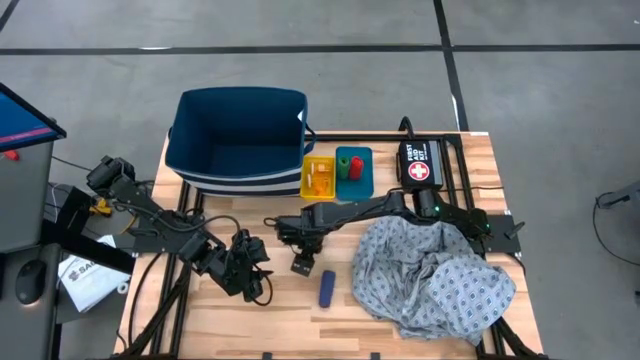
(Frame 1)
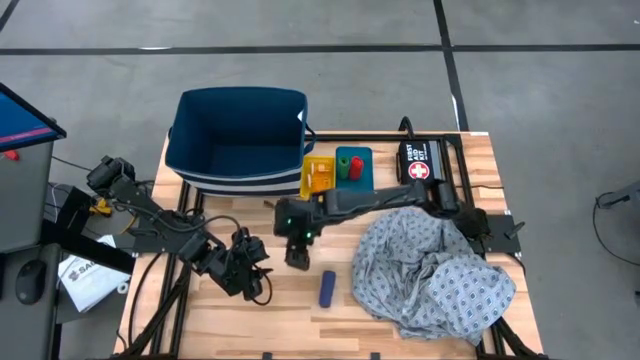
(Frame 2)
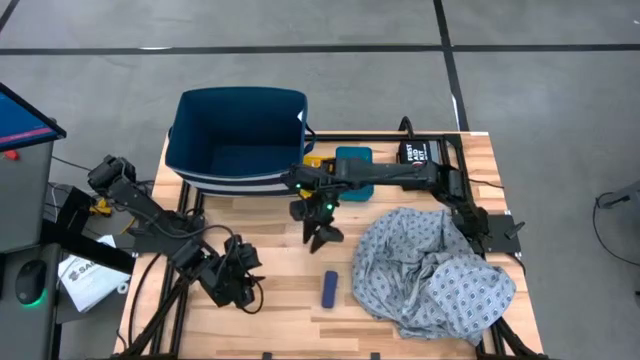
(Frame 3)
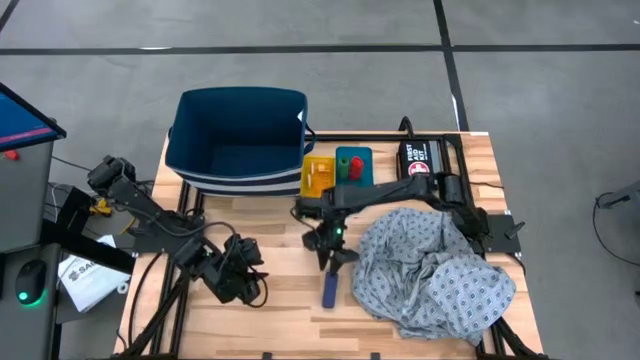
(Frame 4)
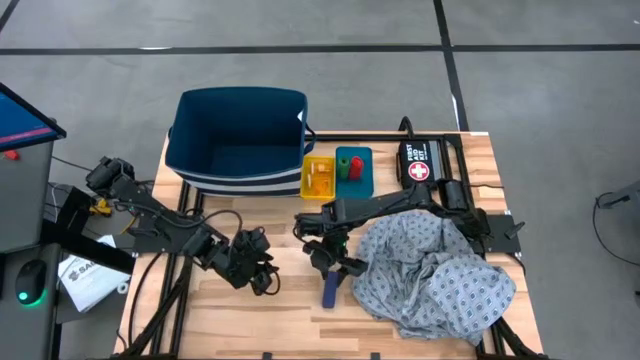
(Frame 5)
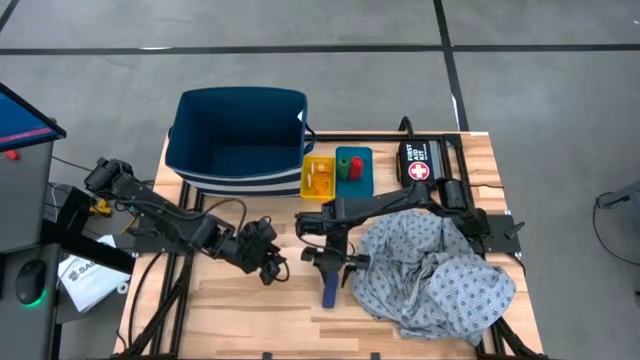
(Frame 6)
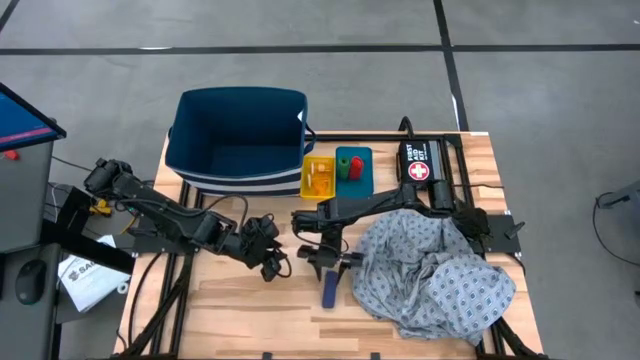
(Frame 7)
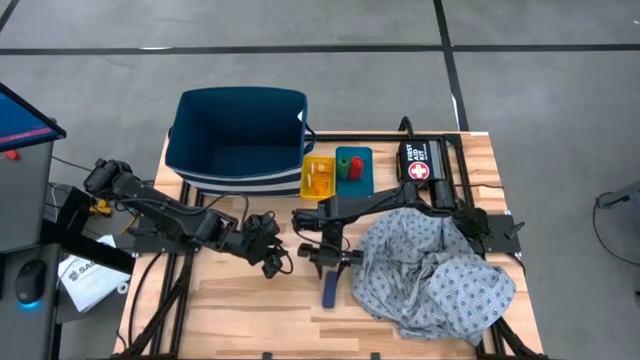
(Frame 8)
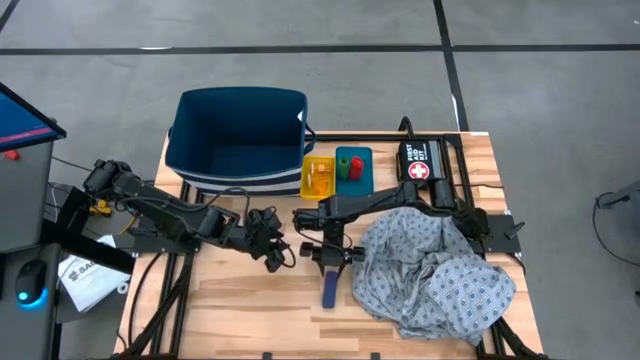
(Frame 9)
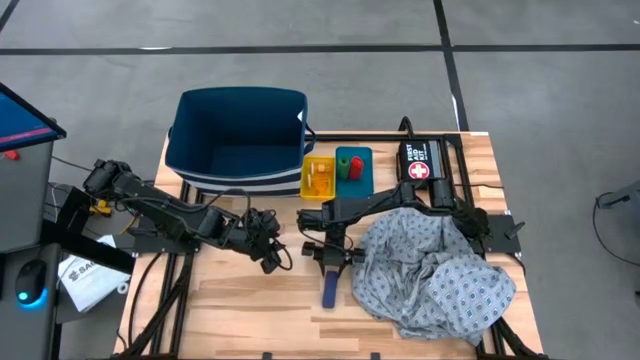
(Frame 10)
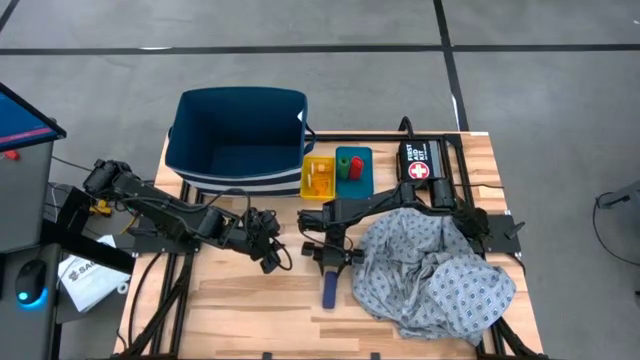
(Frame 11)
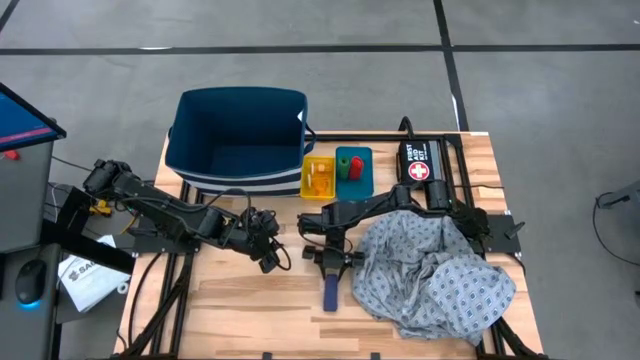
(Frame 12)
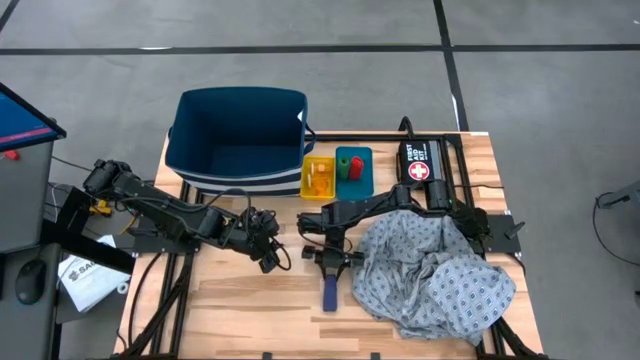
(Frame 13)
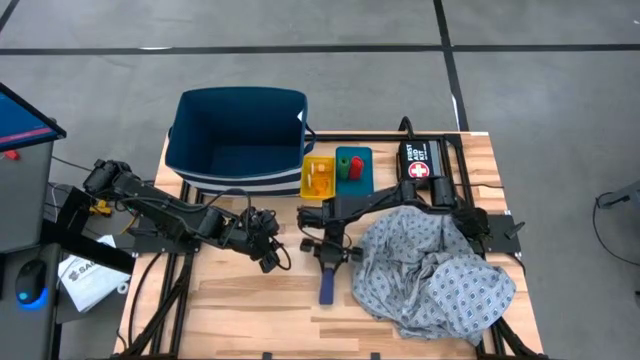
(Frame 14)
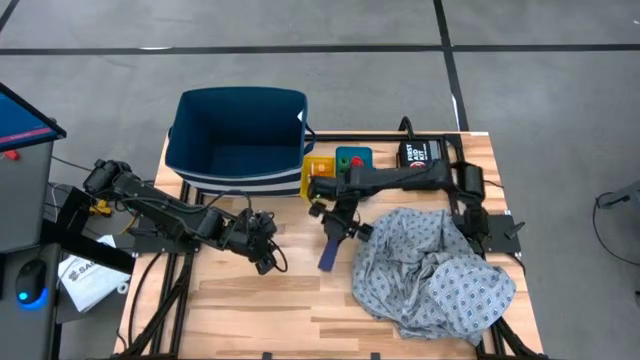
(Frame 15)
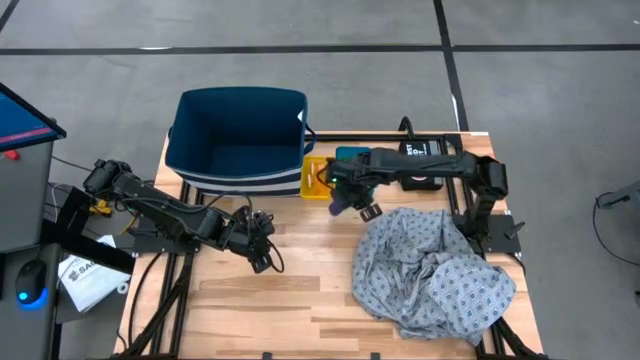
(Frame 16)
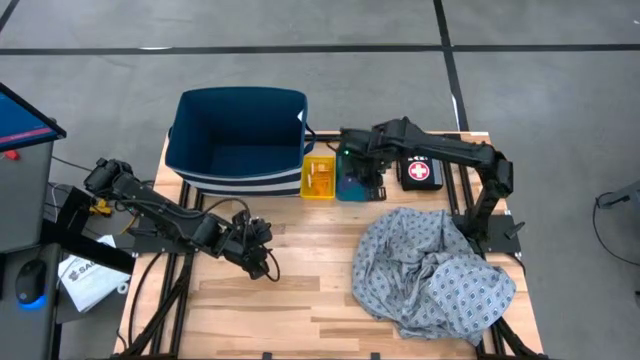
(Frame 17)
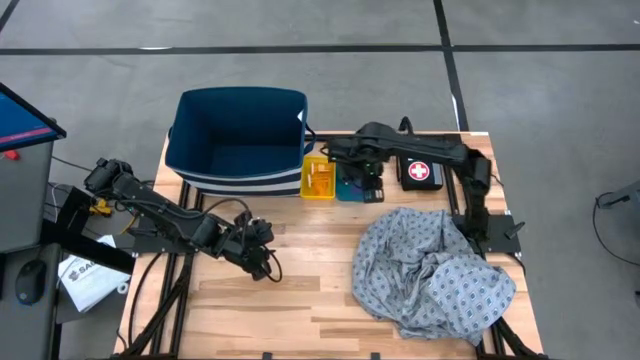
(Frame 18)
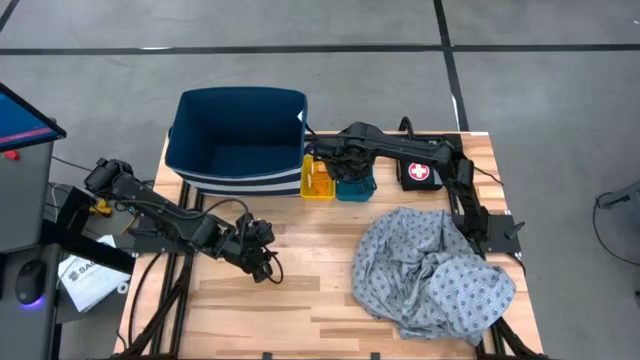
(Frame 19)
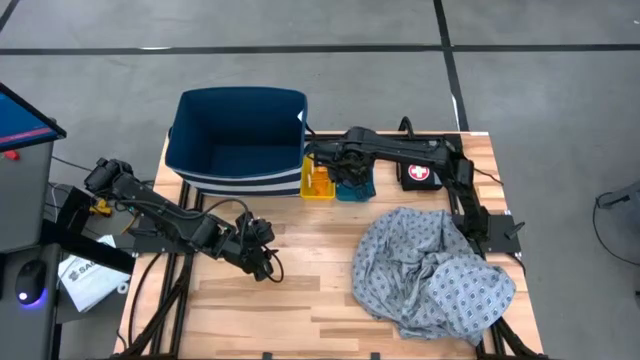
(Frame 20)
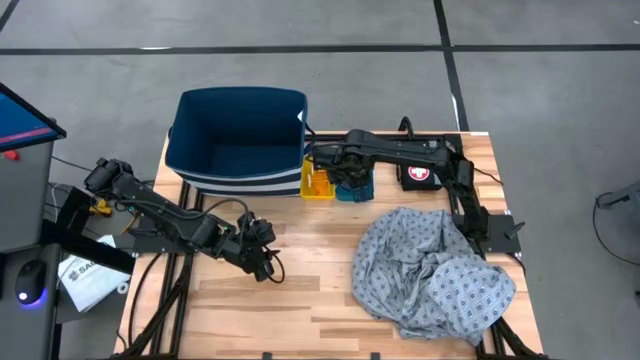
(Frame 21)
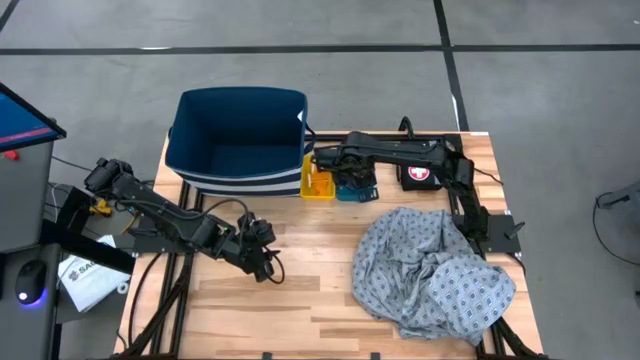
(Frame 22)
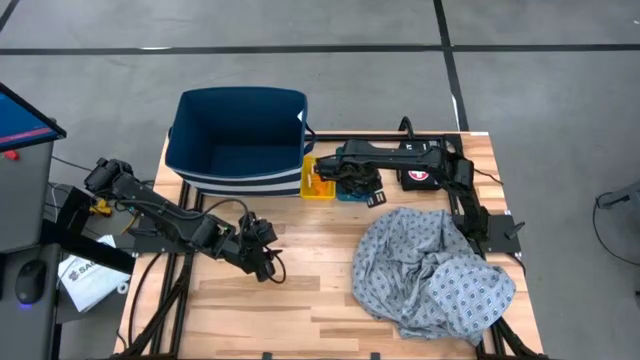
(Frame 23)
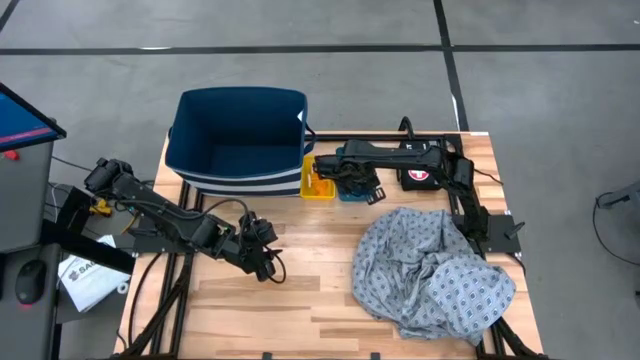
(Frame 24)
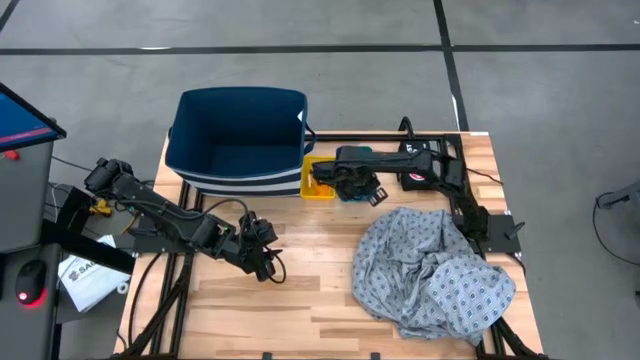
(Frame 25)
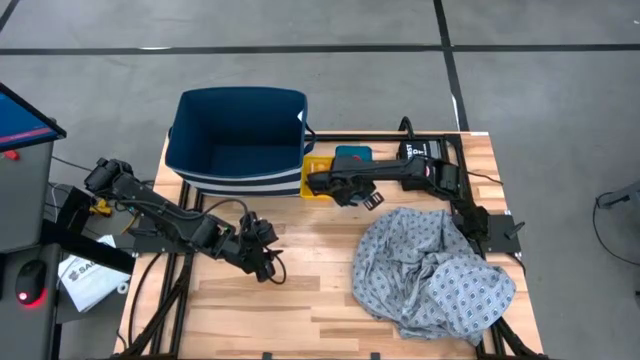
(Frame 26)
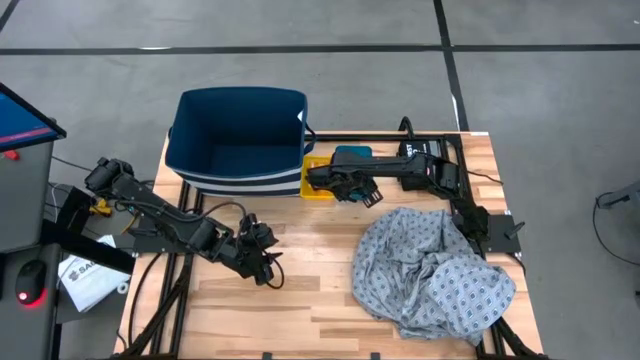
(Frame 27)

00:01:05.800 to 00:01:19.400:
Task: Pick & place medical supplies in basket/bin
Put the blue bandage into the right blue bin

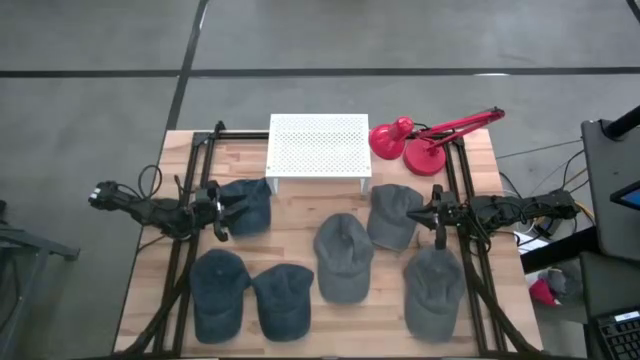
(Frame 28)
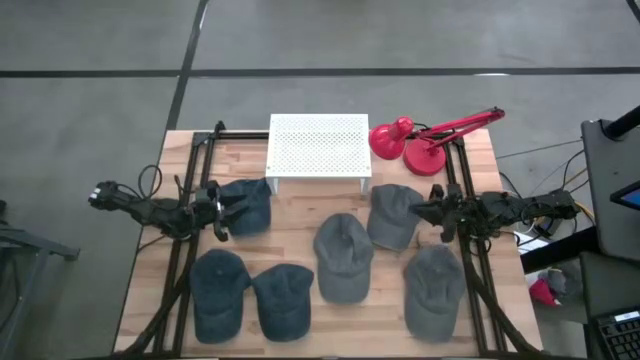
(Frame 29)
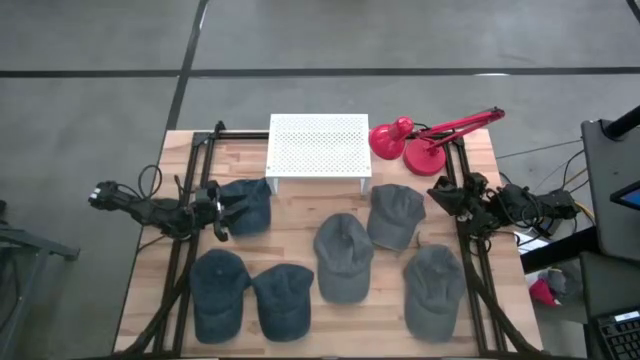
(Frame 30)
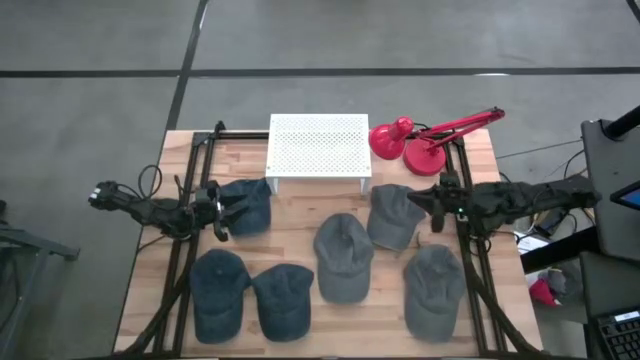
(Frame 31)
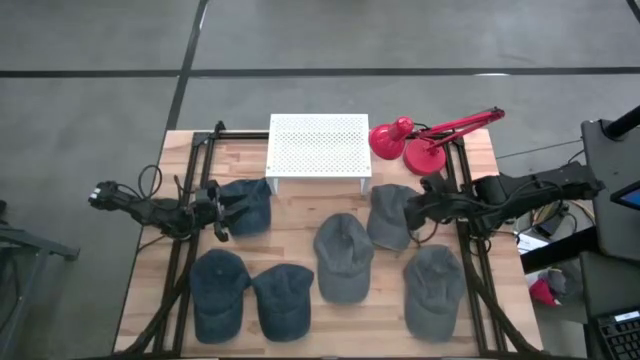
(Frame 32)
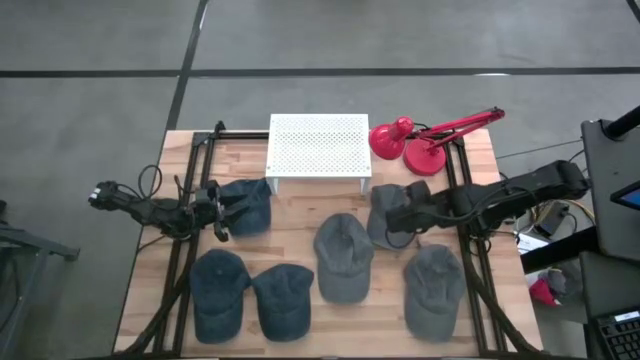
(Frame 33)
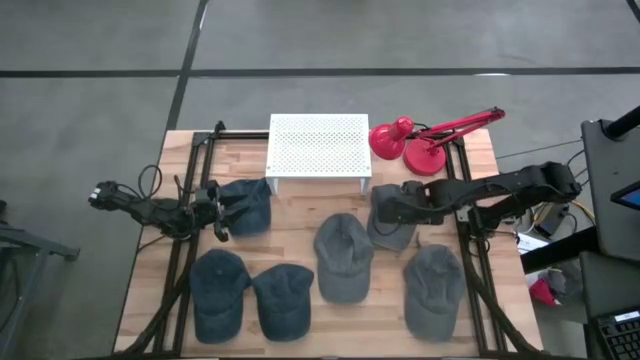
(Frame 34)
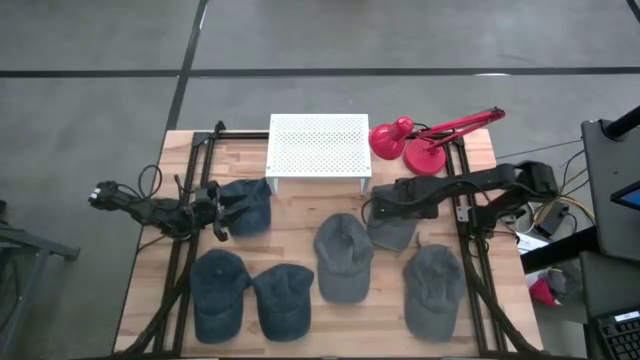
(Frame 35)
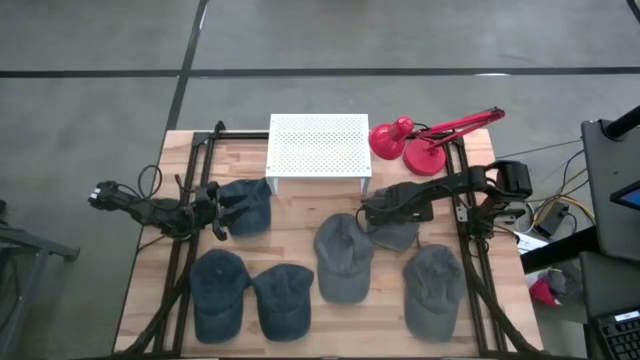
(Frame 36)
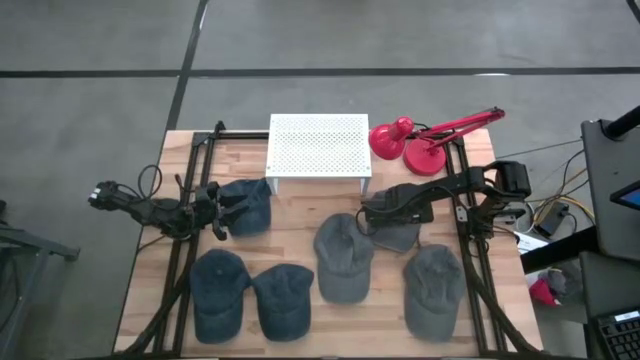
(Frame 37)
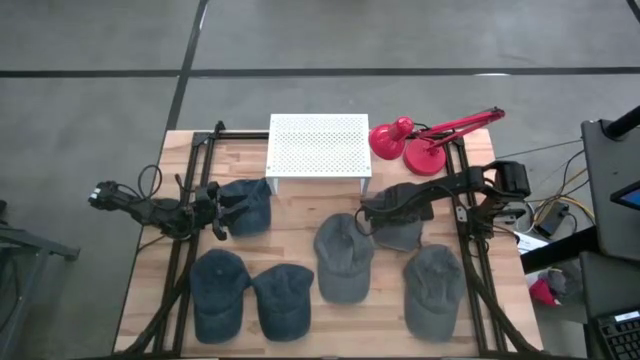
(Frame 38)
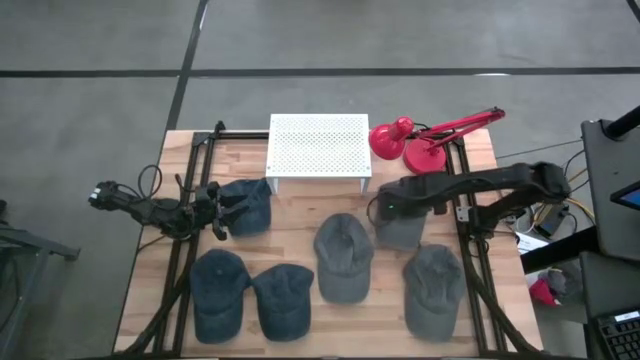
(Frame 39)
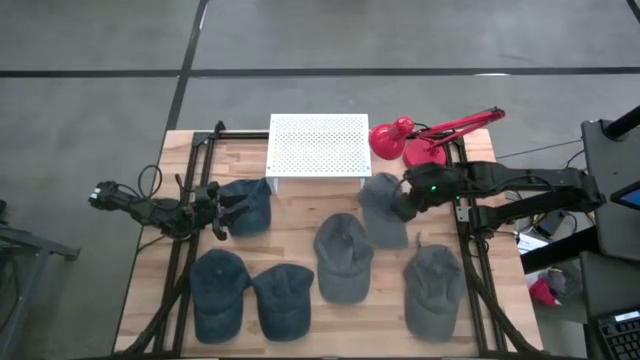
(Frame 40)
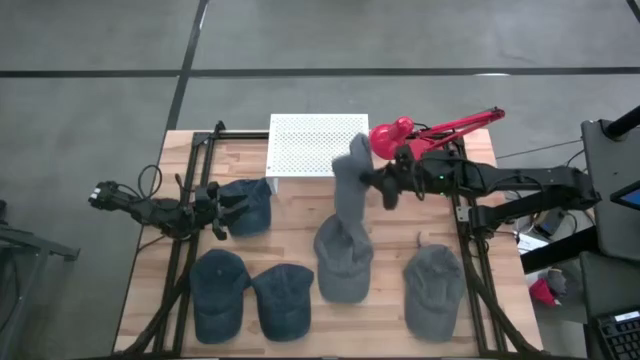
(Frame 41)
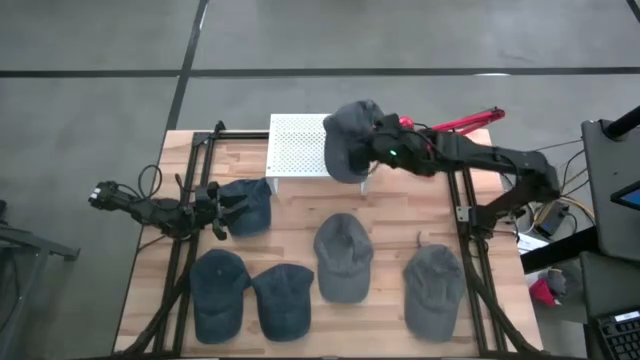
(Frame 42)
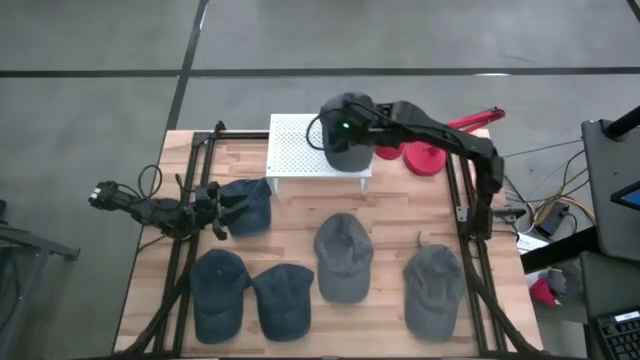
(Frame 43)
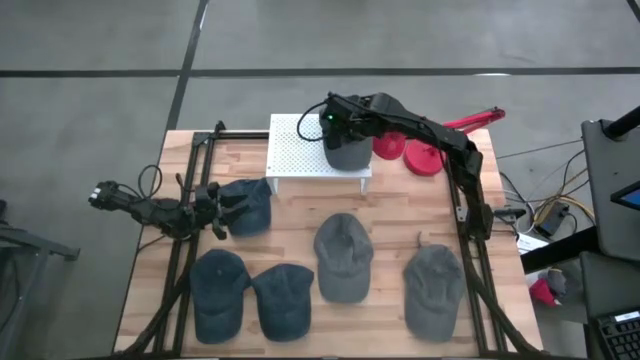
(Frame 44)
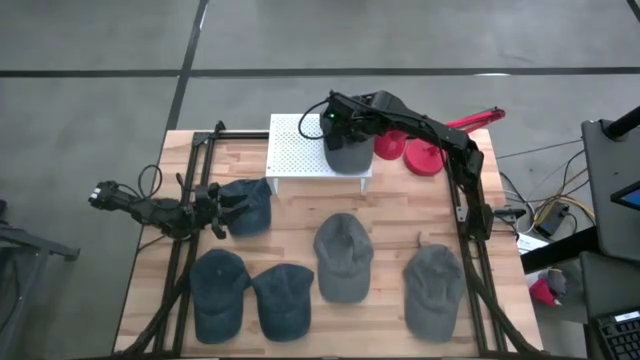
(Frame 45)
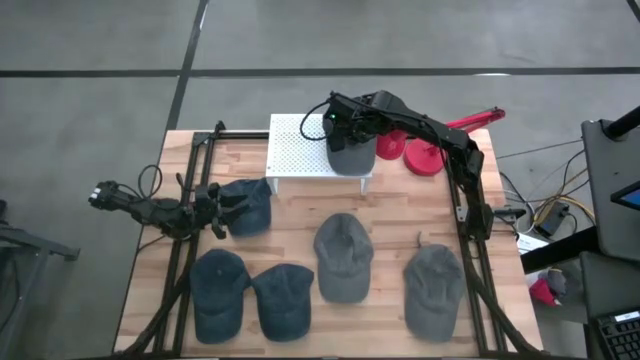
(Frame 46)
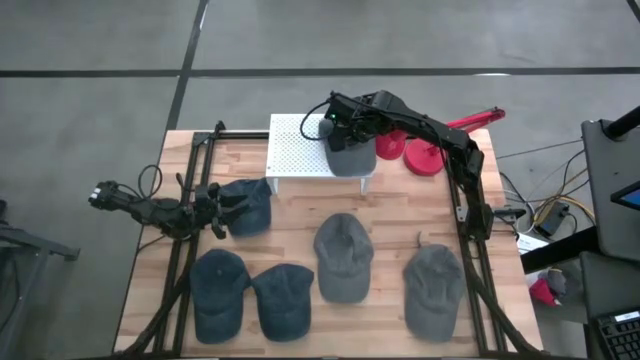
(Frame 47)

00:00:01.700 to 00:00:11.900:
Task: Pick & Place hat
Put the top gray cap on the shelf
